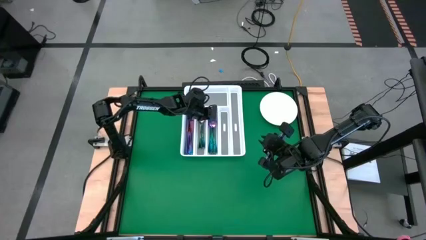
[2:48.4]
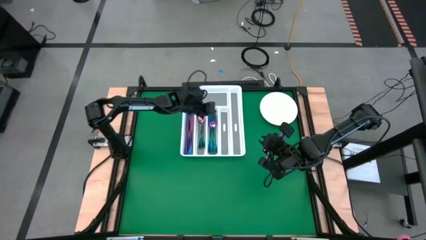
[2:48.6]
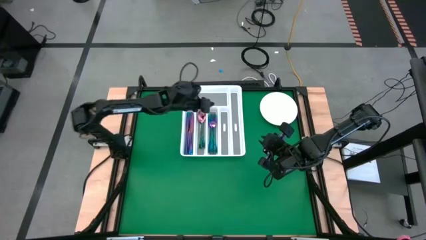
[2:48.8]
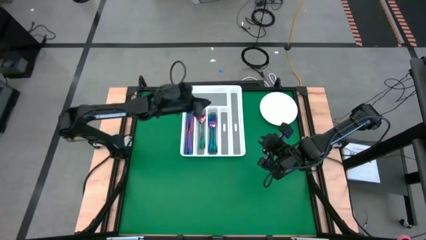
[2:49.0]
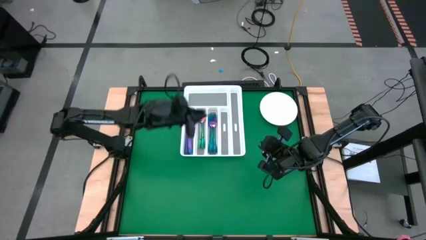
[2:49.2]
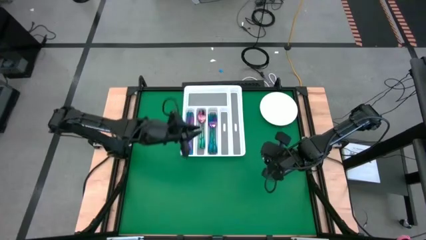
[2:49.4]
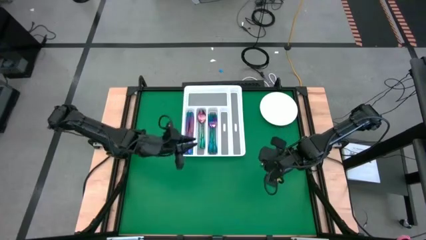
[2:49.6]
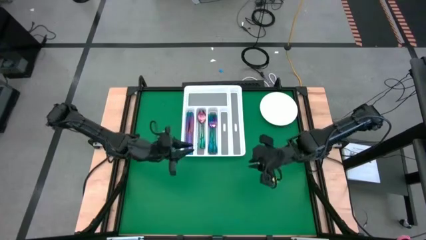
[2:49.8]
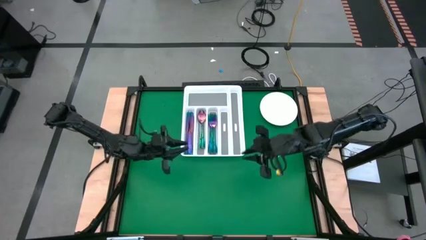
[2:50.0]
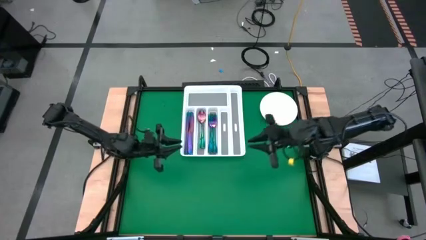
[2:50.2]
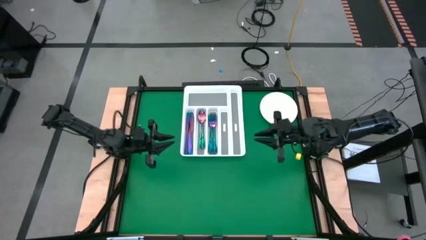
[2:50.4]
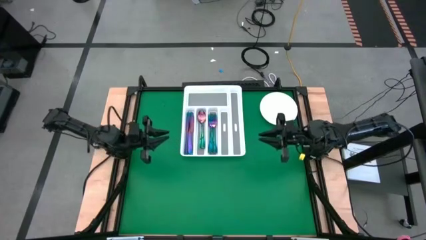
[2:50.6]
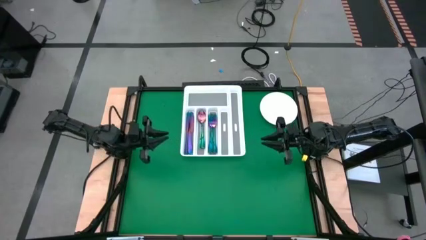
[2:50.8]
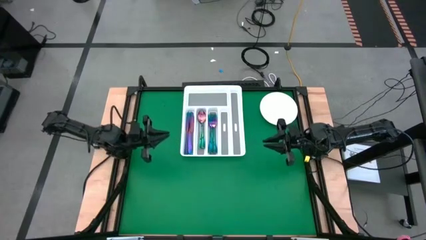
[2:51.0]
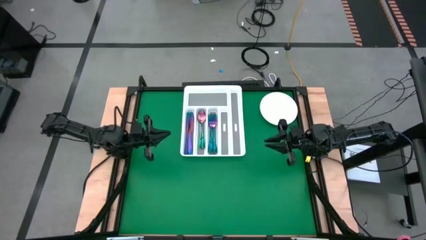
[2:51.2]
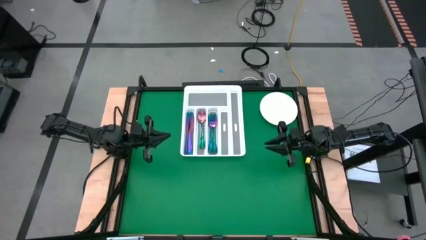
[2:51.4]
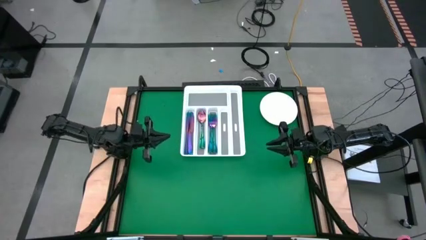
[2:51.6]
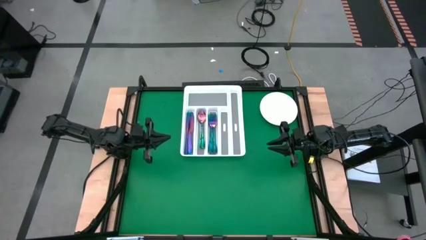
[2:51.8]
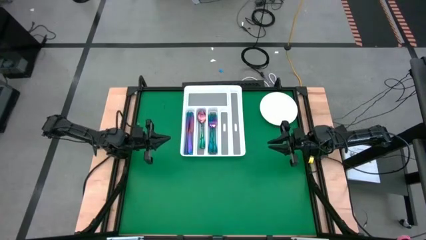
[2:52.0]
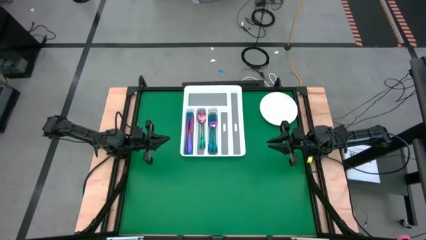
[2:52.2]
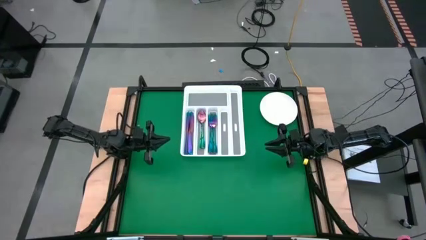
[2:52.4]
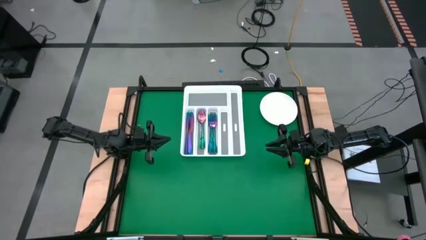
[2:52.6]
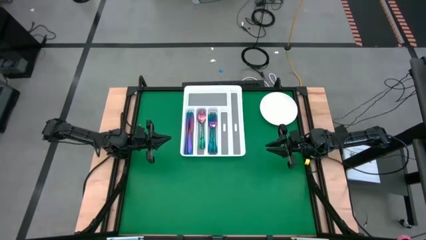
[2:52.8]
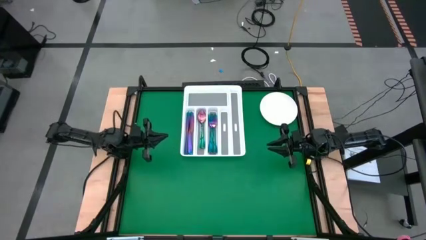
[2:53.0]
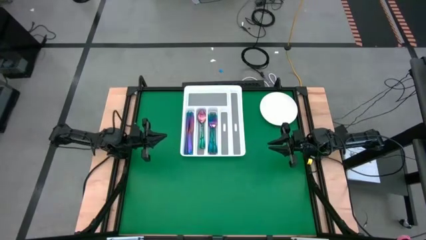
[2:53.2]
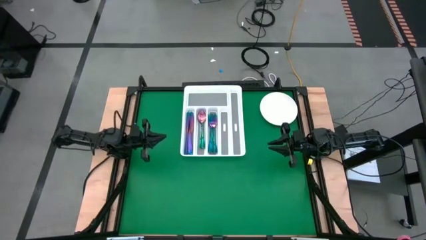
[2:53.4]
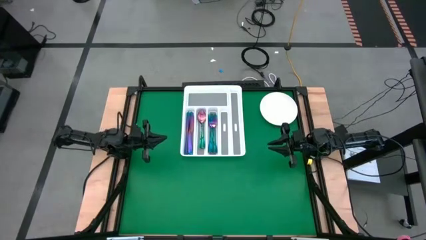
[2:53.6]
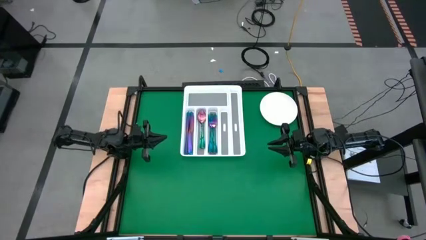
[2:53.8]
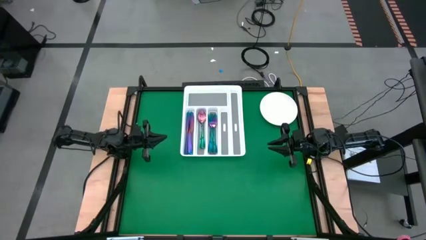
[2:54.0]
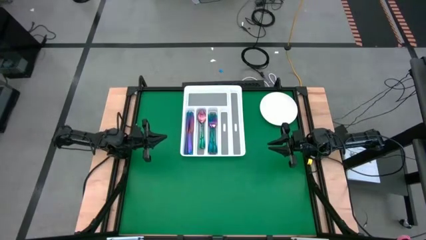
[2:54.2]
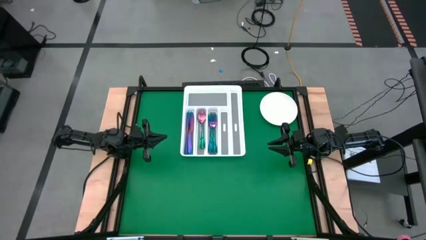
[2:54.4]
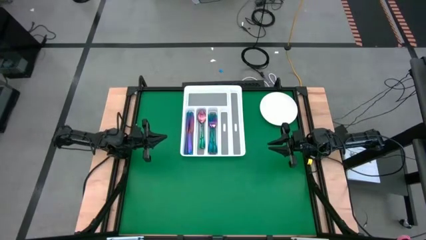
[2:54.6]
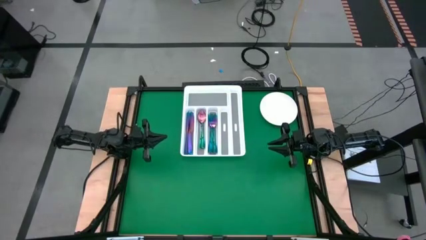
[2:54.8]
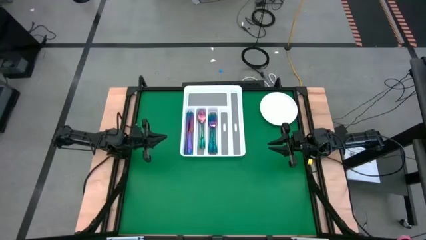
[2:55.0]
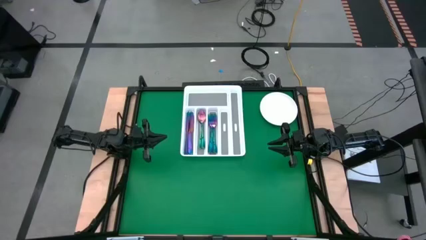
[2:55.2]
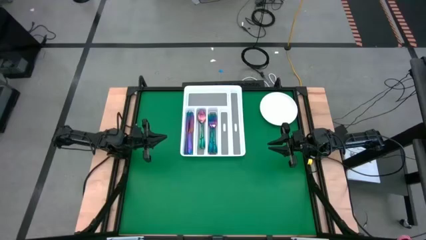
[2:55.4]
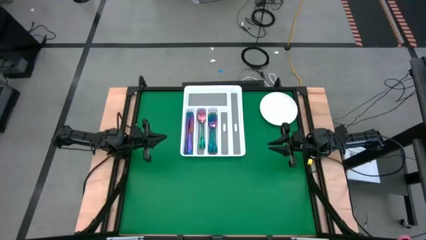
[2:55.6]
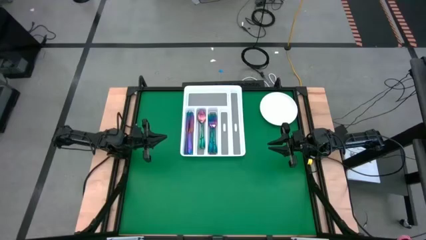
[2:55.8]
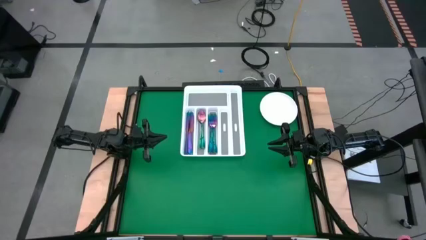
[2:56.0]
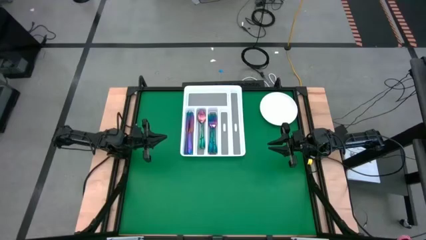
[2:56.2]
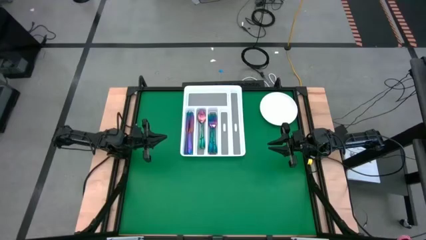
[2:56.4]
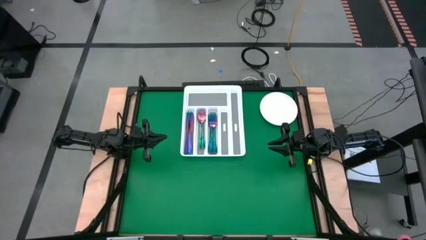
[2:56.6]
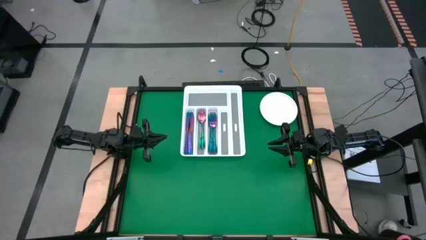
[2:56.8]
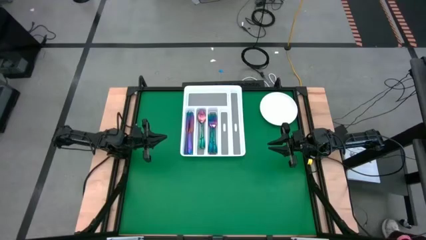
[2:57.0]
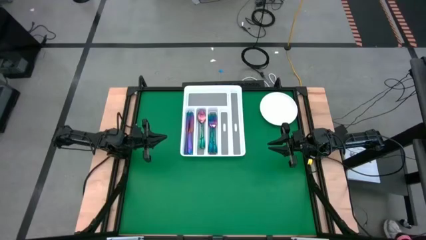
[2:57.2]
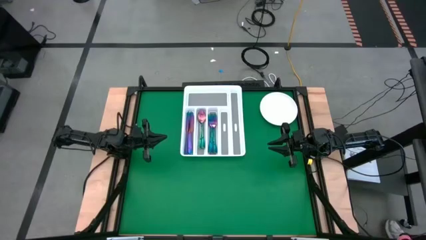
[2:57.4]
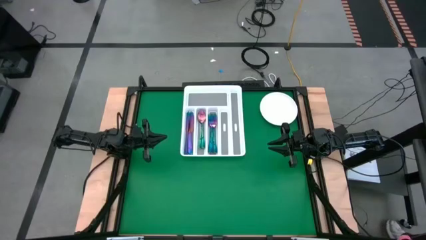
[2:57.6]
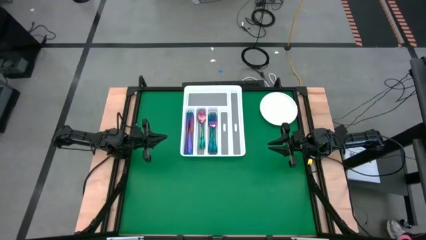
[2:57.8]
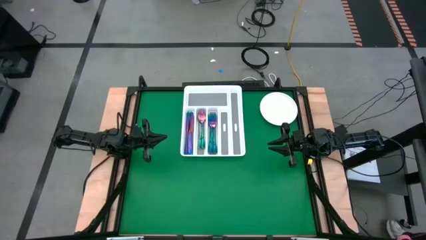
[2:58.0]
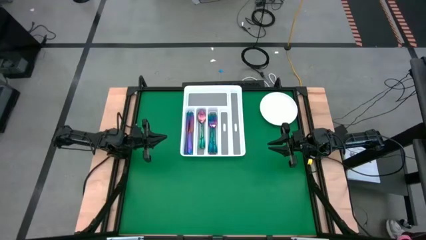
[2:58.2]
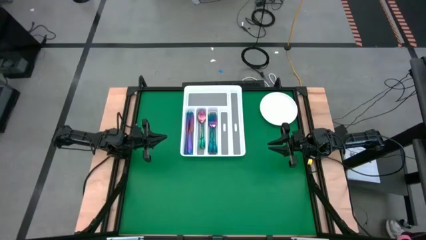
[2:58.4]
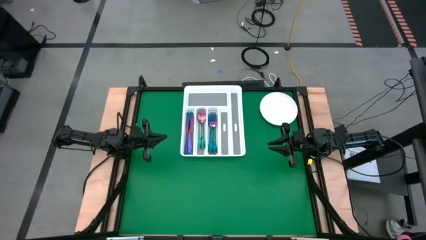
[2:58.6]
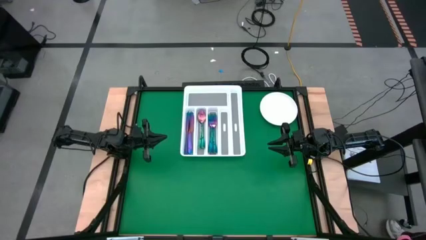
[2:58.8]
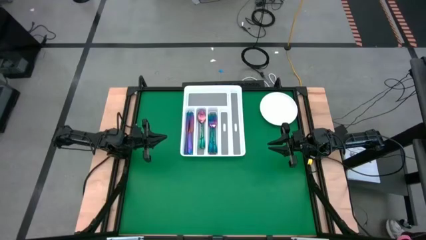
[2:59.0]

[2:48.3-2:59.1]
Task: Sort silverware
Return to Home Position

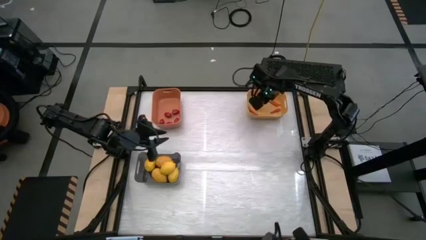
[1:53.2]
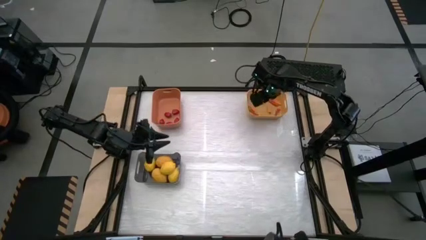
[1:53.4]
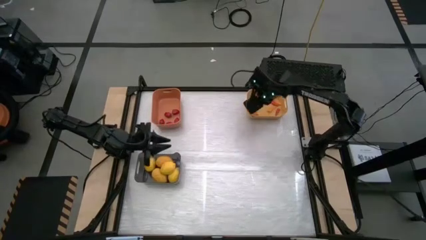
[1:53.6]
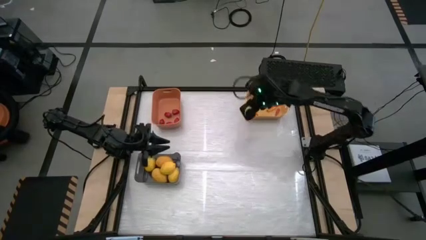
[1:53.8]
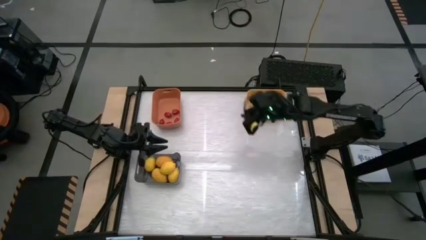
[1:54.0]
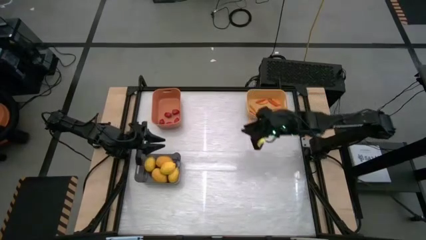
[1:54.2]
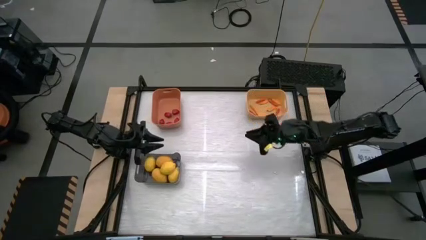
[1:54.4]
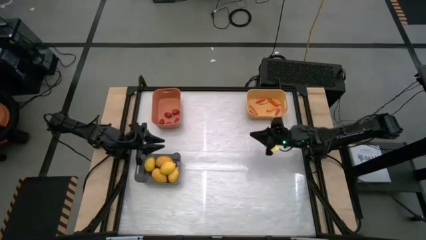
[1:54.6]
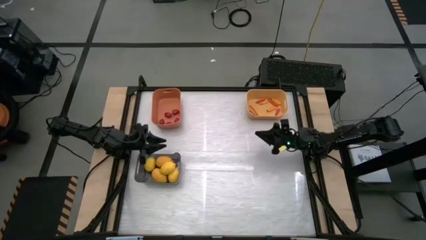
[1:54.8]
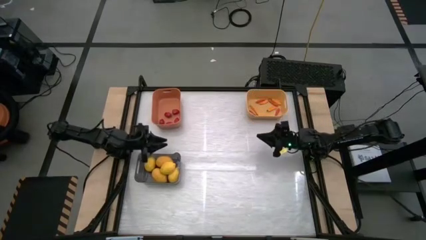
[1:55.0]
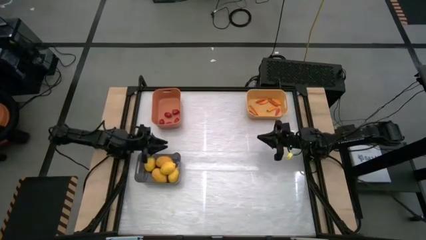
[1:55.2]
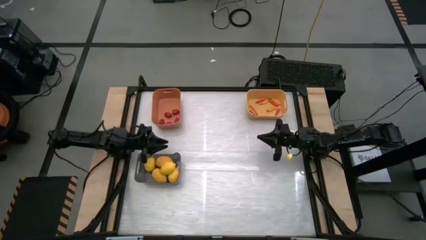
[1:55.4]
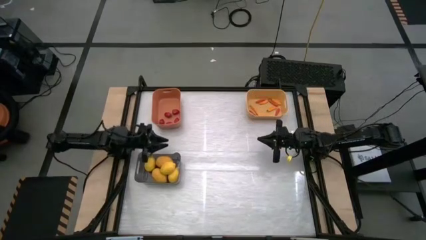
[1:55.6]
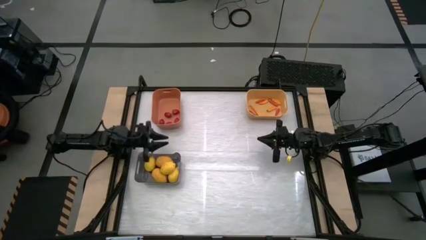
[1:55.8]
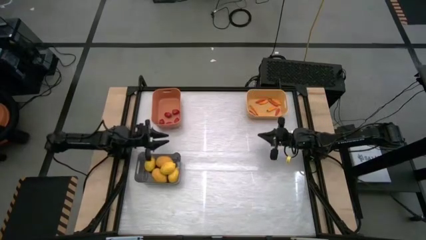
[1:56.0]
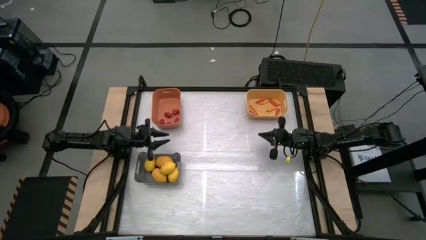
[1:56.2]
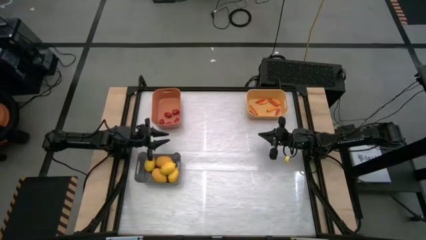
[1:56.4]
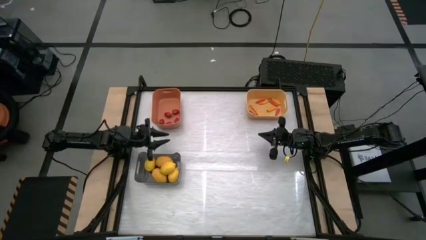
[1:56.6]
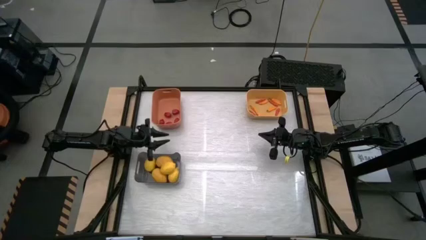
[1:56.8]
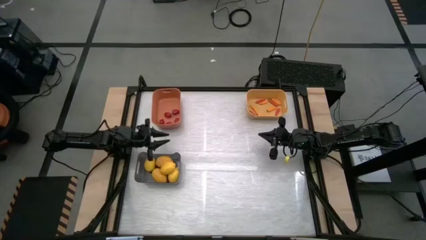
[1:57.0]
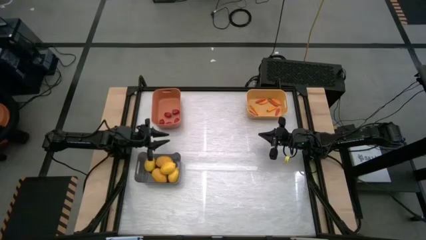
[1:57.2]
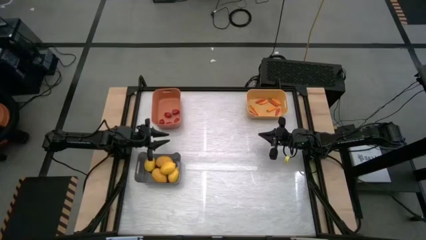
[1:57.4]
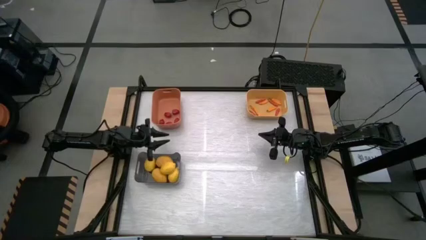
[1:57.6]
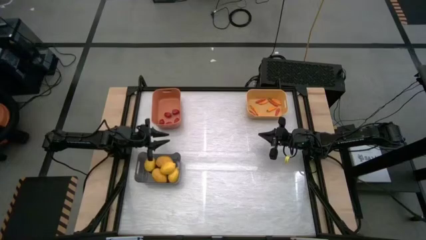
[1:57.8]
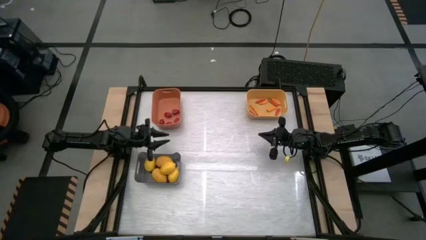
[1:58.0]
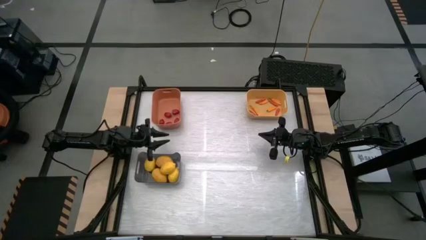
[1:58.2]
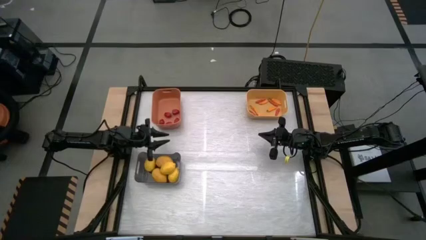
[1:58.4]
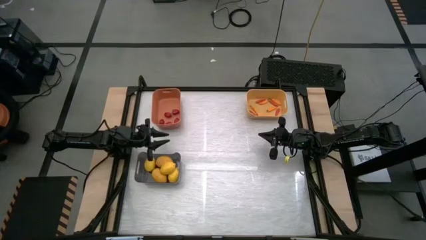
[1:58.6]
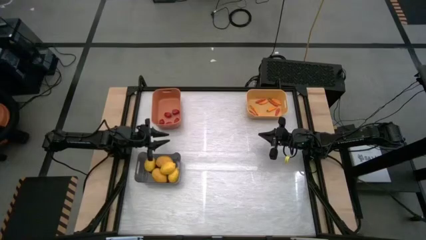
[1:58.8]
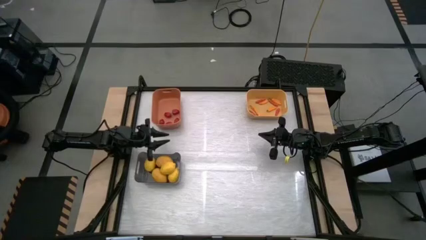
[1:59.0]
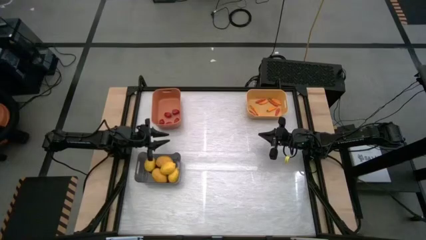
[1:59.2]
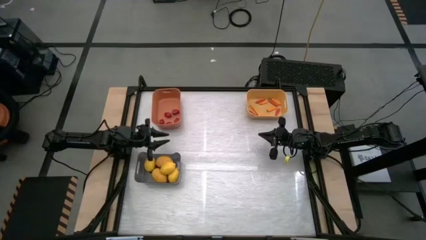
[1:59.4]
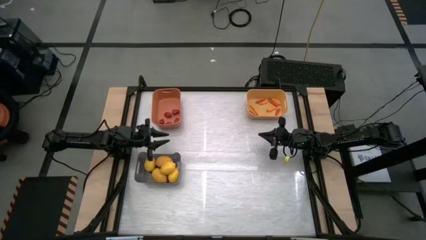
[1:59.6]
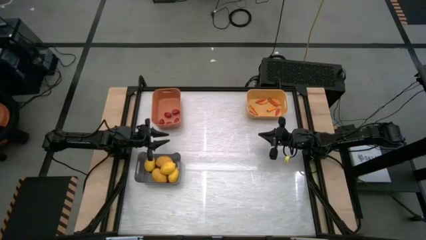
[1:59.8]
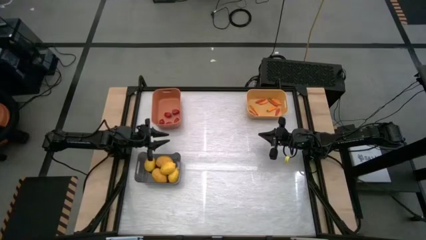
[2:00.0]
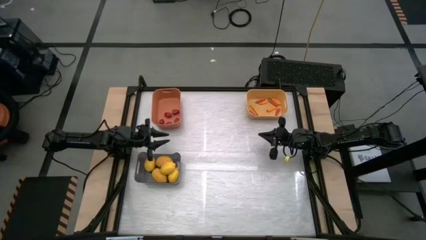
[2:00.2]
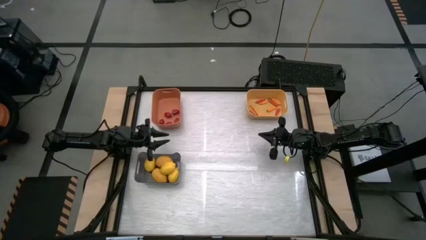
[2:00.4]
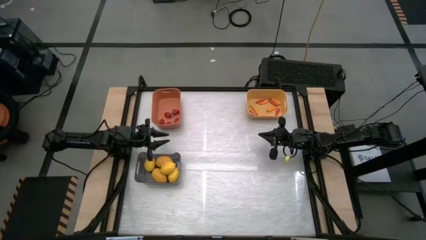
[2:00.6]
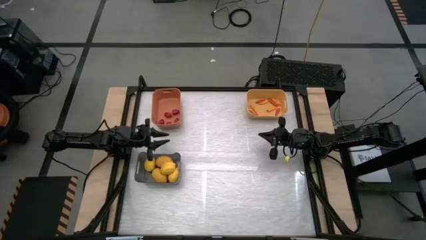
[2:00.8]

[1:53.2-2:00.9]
Task: Sort produce into baskets
Return to Home Position
